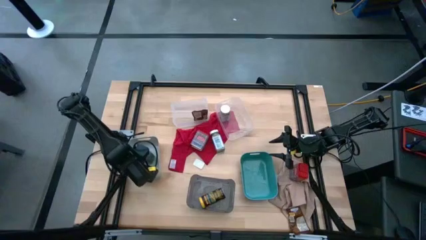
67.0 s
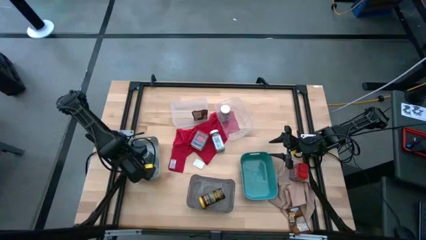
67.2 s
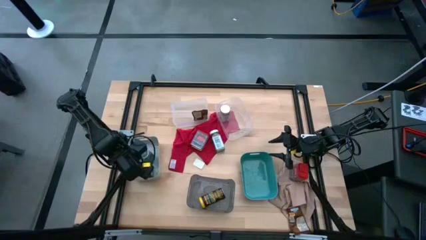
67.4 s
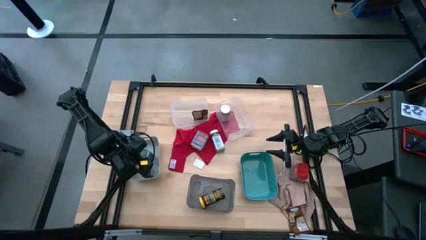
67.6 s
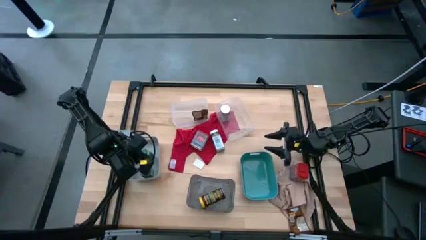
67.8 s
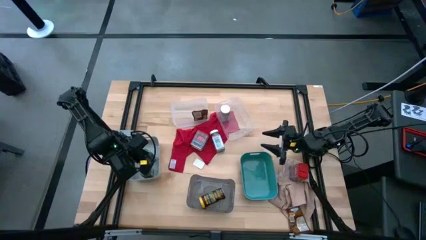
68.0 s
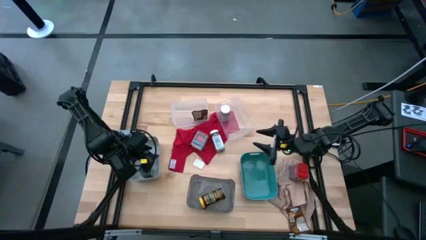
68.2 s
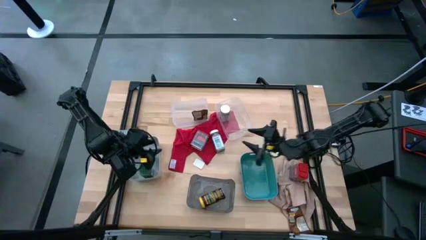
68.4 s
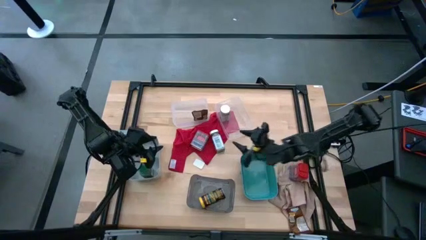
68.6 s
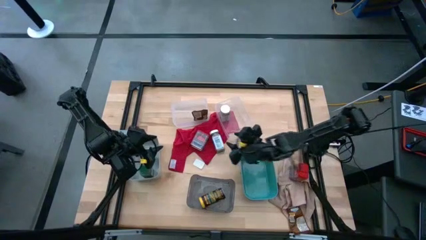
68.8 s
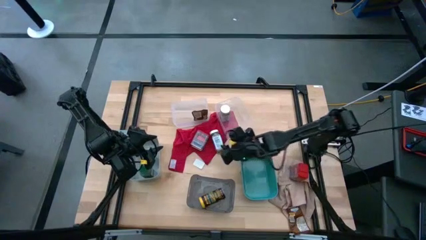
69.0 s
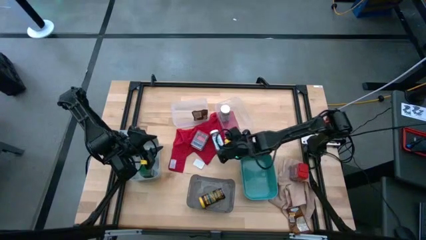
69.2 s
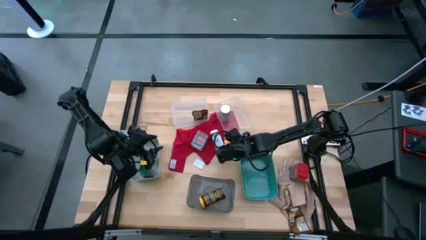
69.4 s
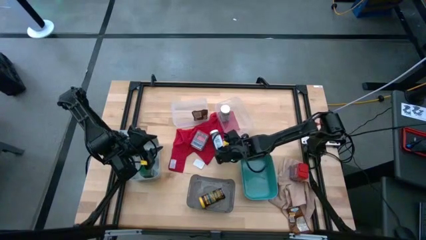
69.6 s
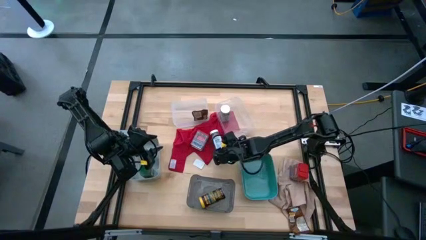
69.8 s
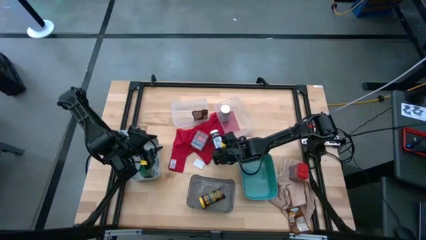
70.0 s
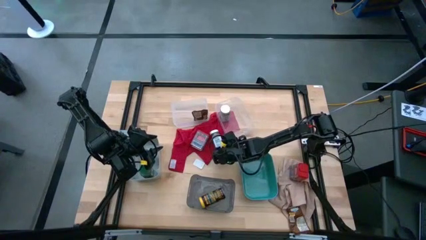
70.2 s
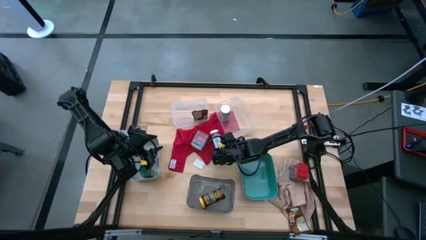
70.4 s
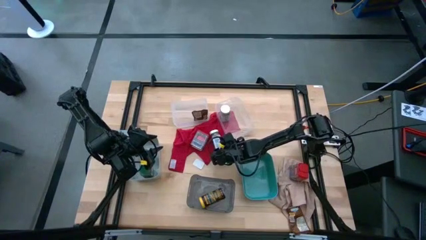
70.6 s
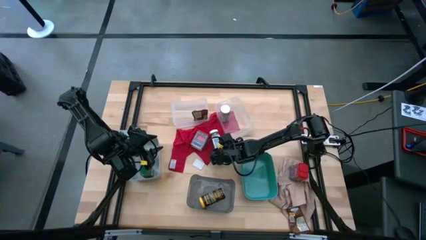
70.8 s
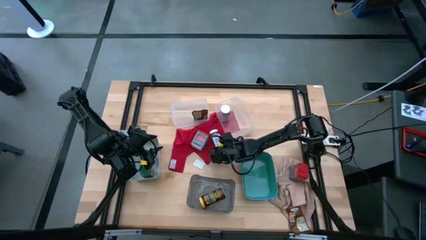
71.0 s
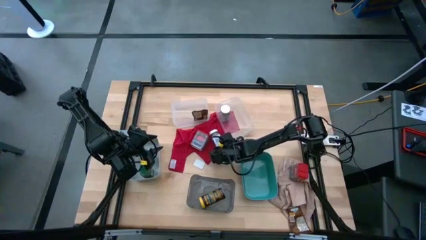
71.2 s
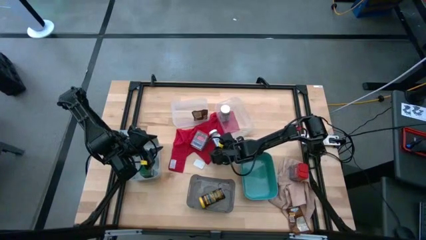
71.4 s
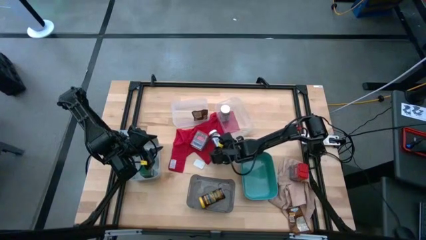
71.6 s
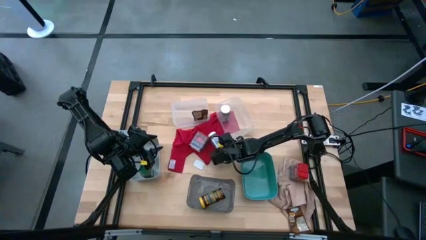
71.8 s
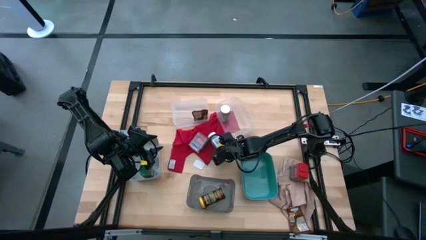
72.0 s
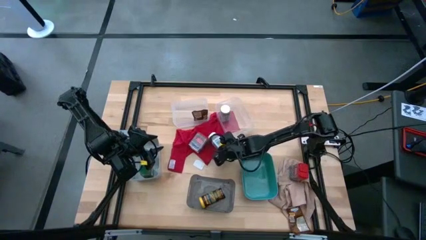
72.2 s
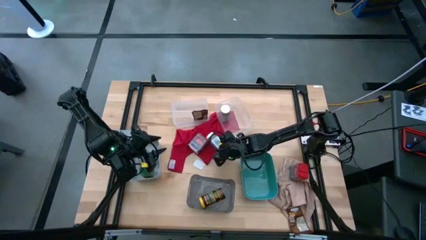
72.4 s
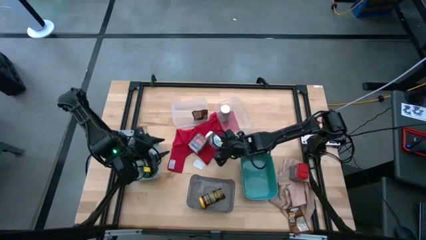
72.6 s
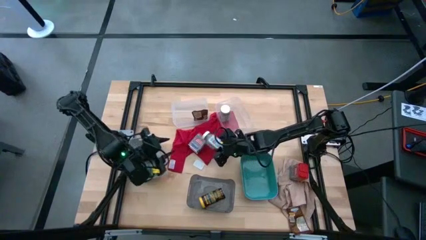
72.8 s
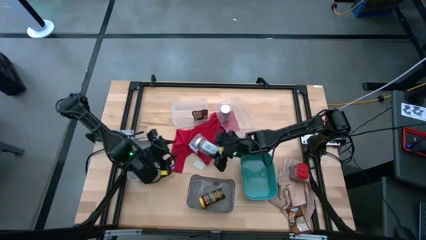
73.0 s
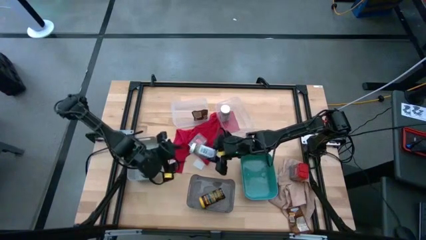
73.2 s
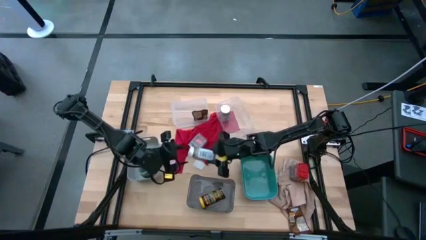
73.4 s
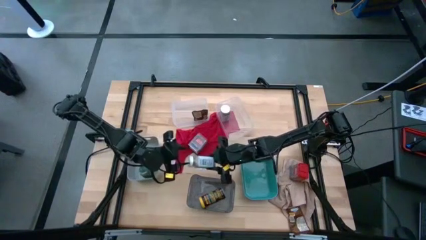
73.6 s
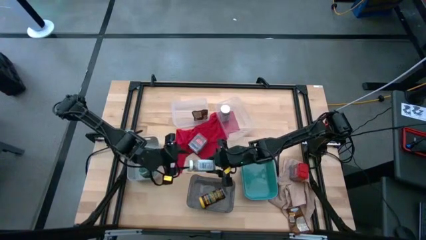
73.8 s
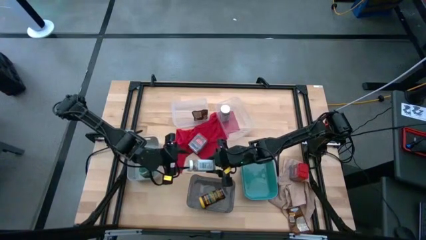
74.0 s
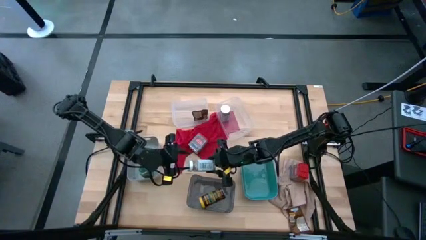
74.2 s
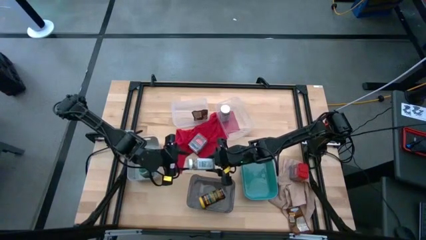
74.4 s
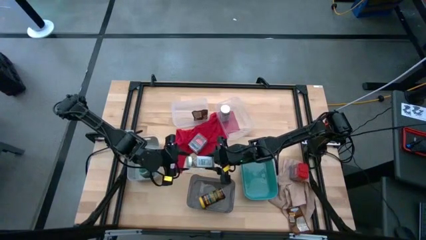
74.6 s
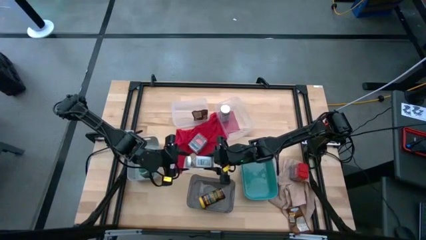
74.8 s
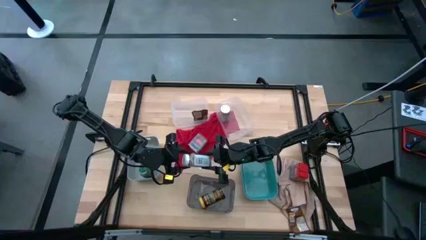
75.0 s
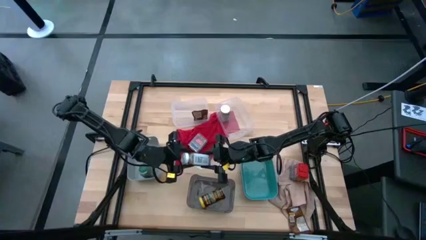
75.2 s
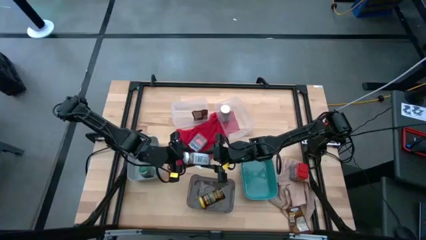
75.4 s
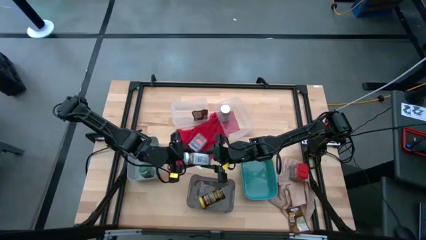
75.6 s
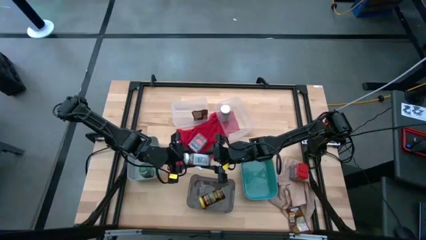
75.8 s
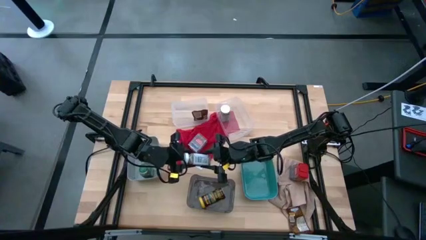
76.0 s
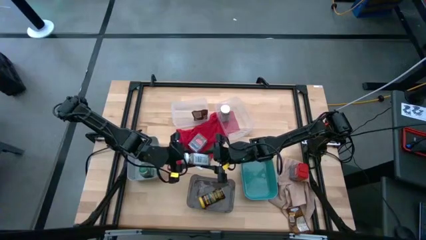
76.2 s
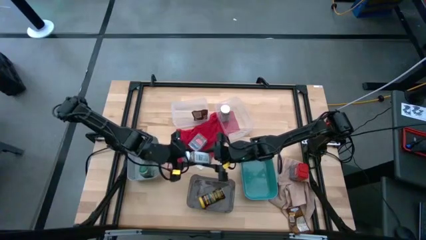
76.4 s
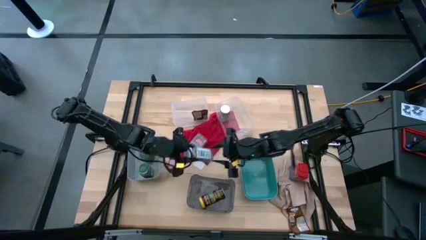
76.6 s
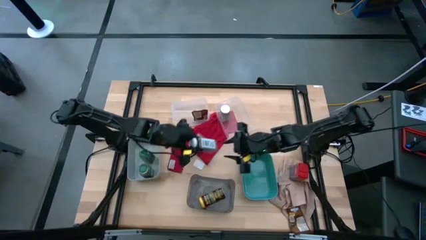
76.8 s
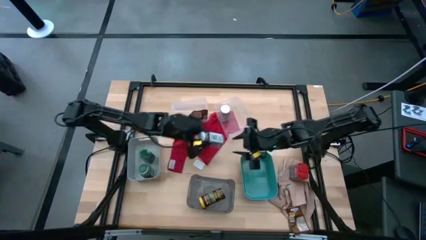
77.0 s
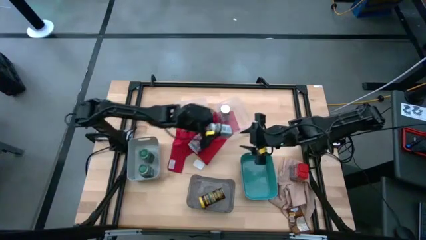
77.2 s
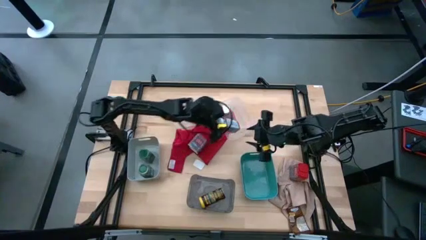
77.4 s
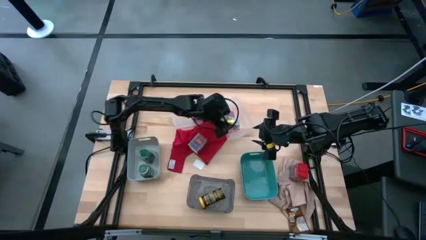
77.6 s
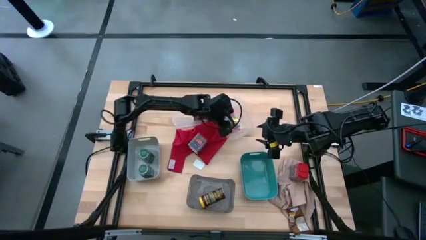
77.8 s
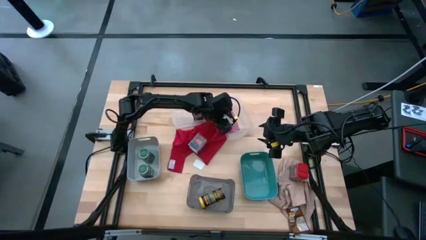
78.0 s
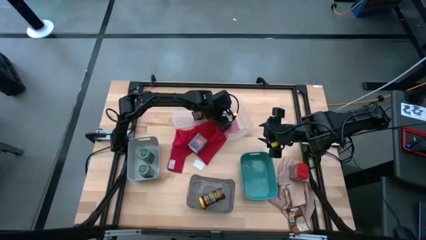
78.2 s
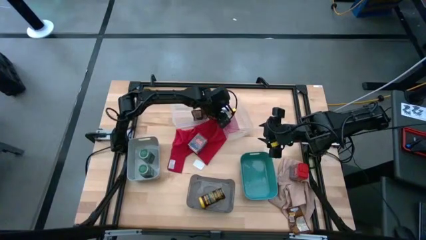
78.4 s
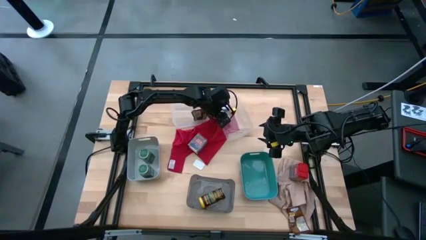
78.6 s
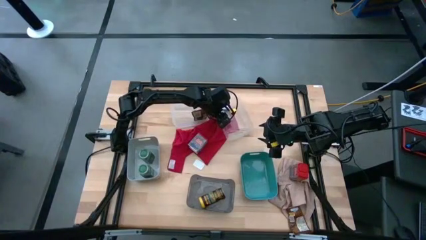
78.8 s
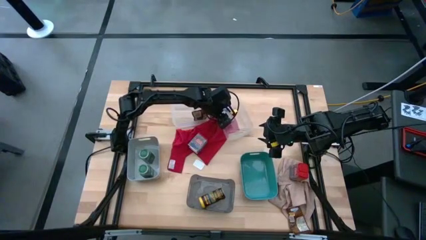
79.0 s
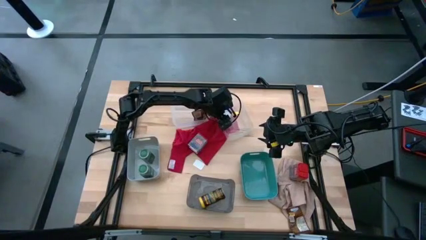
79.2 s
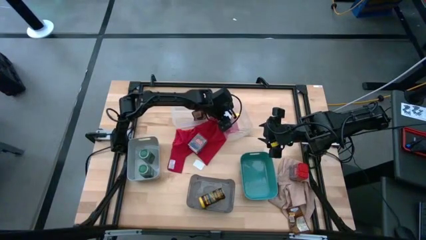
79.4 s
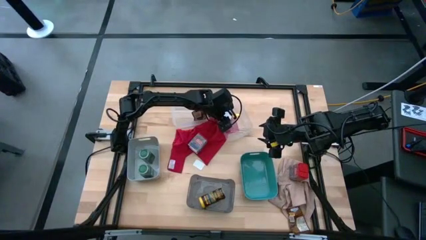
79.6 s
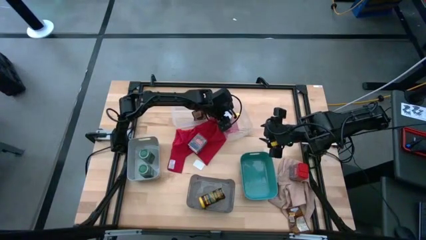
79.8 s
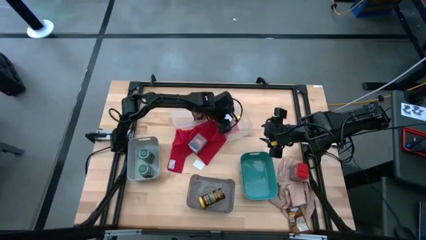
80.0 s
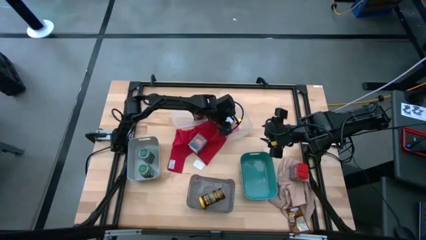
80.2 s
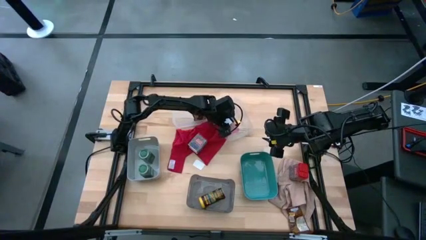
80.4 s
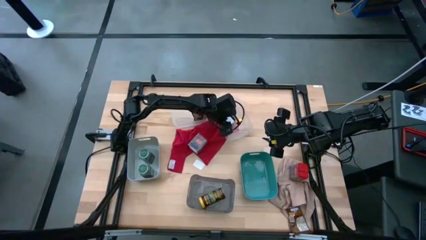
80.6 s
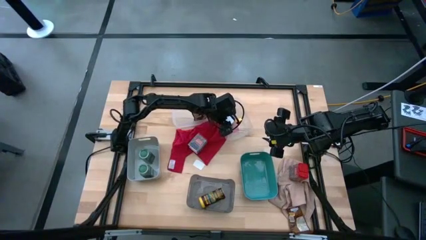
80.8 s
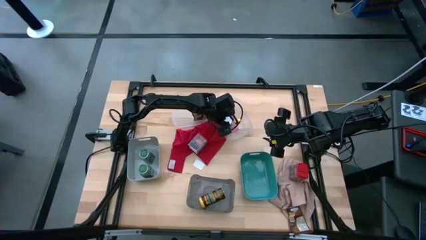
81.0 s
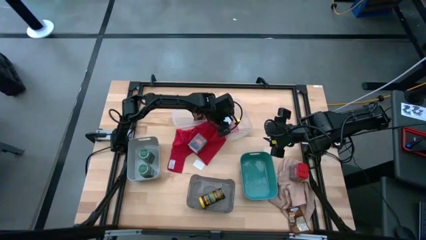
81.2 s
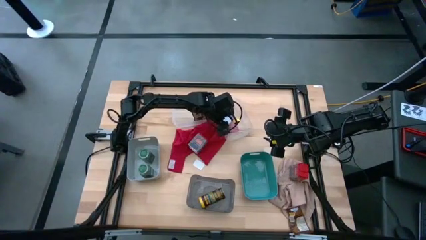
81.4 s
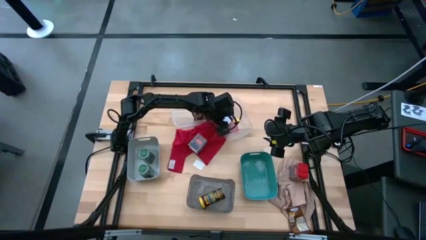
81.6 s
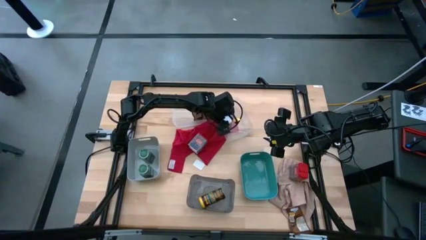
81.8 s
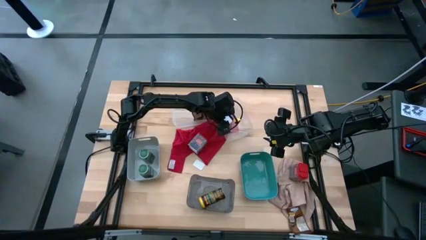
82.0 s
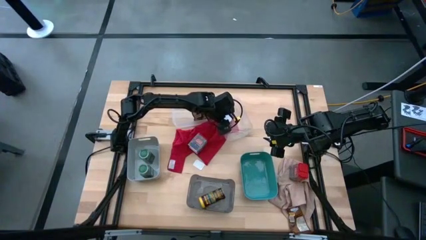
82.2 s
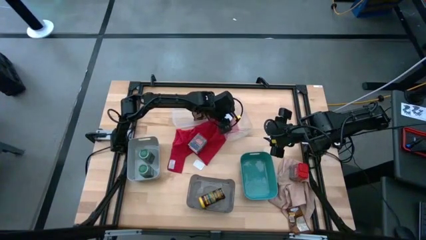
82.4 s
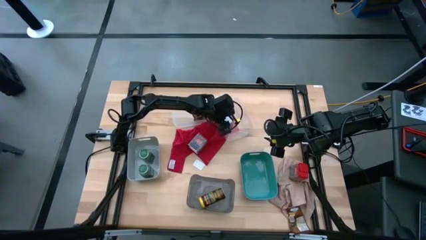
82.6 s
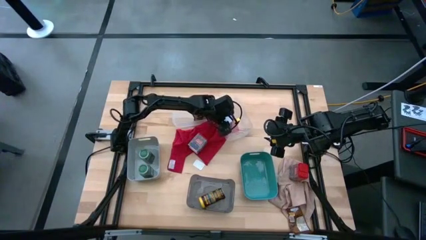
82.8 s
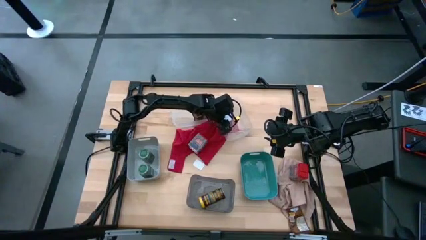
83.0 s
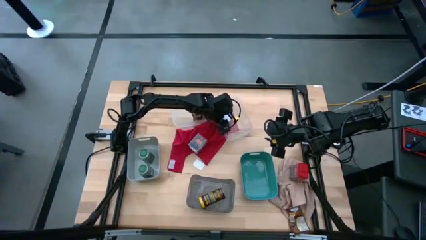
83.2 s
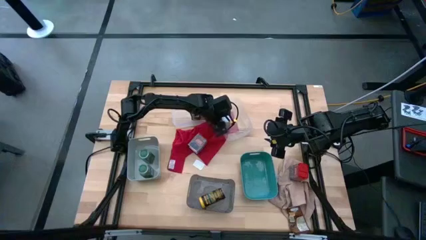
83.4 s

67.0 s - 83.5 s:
Task: Sort spices by type
Put the white seasoning bottle into the right transparent bin
